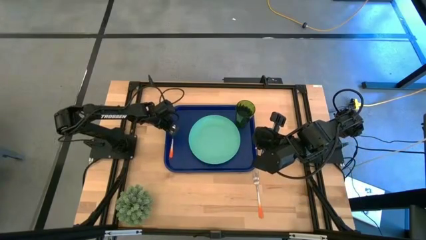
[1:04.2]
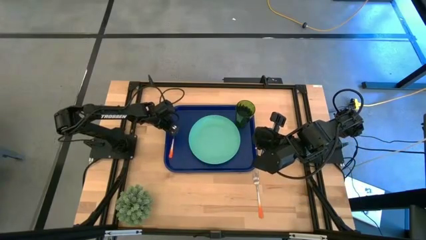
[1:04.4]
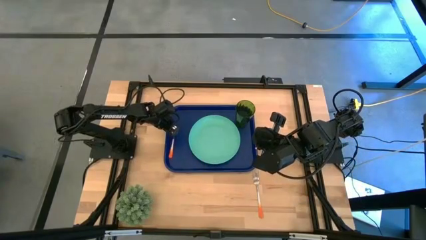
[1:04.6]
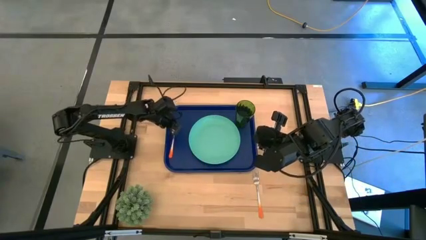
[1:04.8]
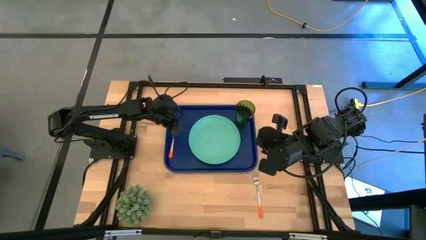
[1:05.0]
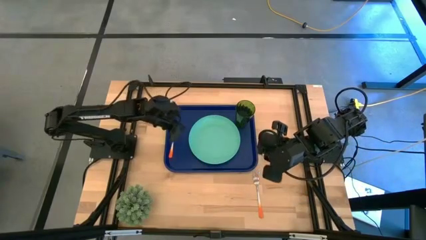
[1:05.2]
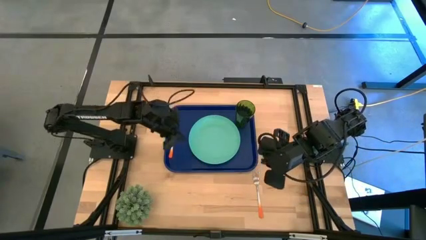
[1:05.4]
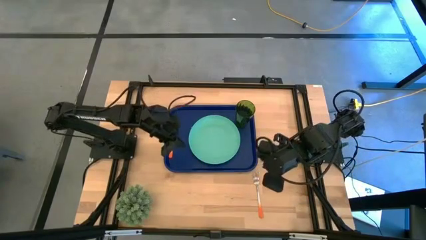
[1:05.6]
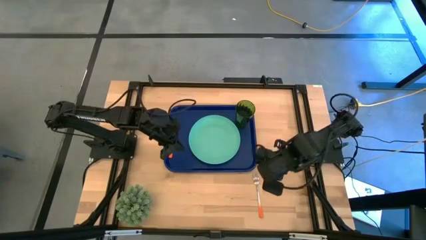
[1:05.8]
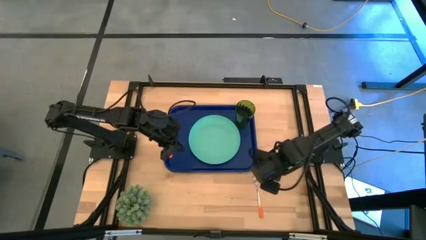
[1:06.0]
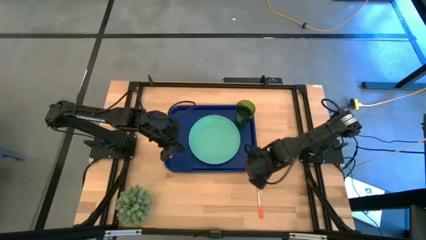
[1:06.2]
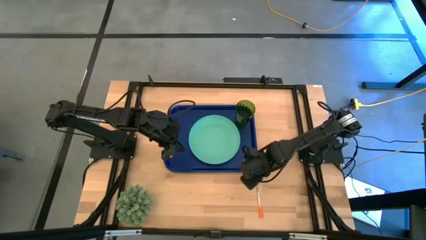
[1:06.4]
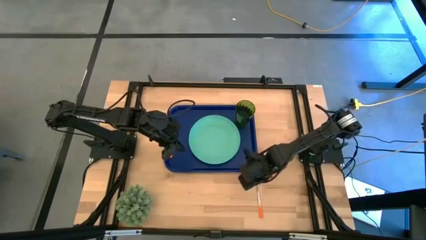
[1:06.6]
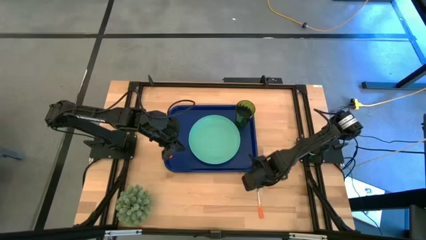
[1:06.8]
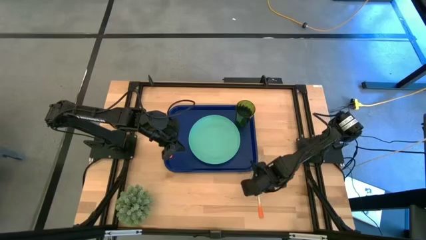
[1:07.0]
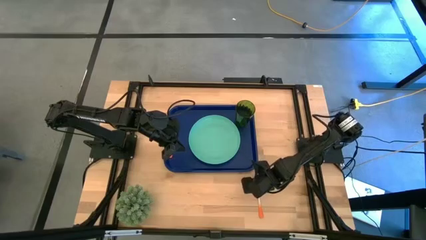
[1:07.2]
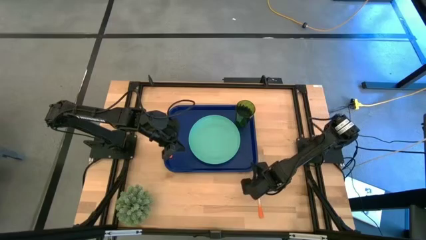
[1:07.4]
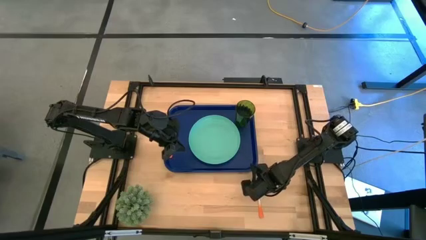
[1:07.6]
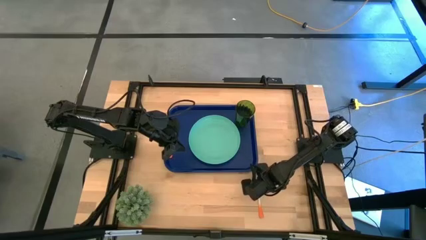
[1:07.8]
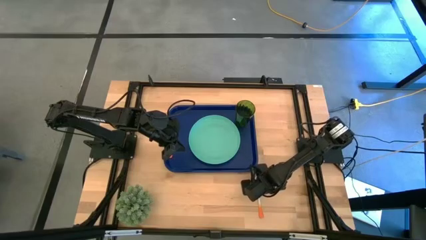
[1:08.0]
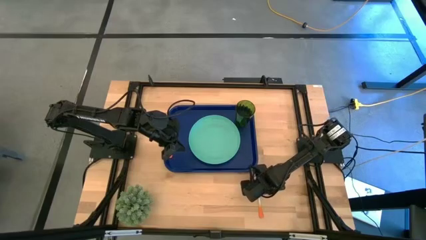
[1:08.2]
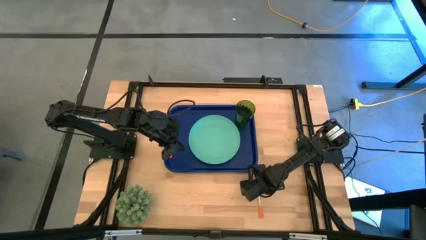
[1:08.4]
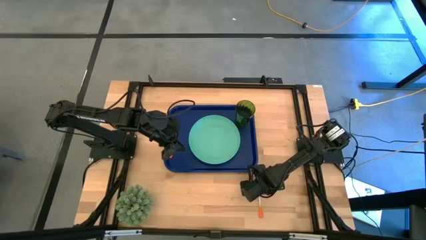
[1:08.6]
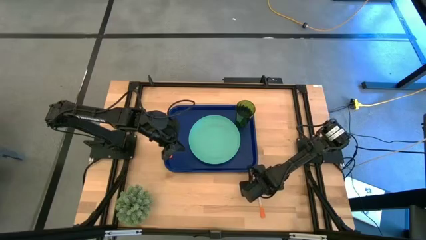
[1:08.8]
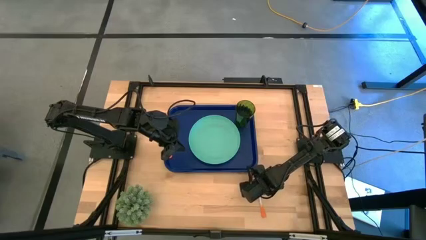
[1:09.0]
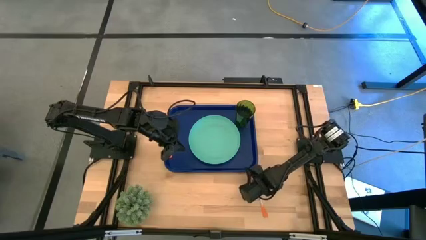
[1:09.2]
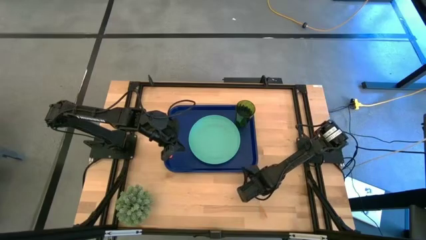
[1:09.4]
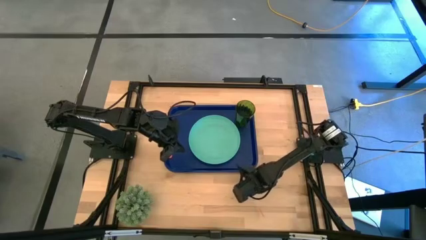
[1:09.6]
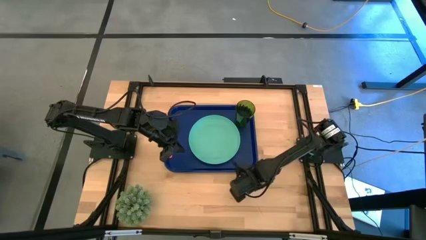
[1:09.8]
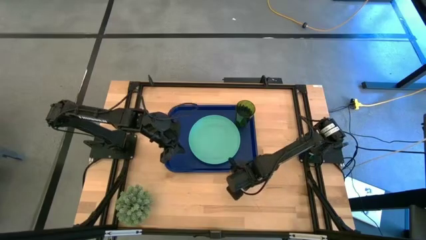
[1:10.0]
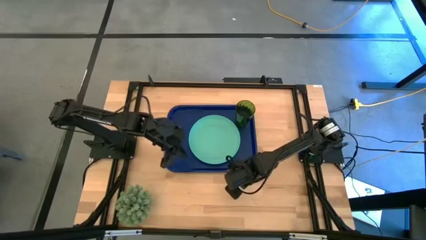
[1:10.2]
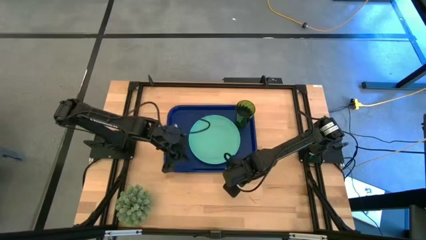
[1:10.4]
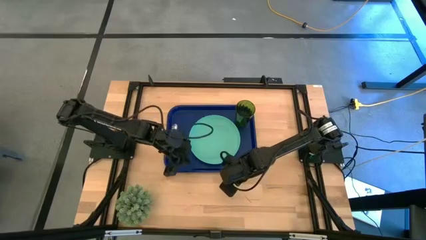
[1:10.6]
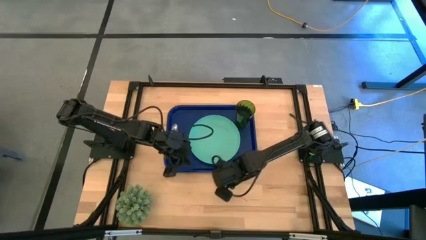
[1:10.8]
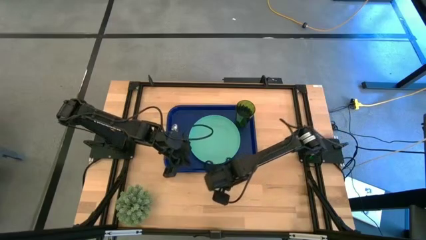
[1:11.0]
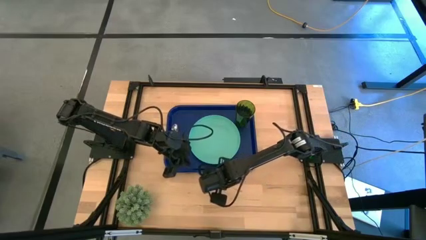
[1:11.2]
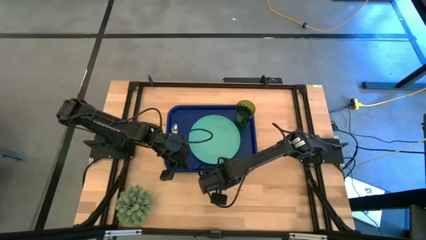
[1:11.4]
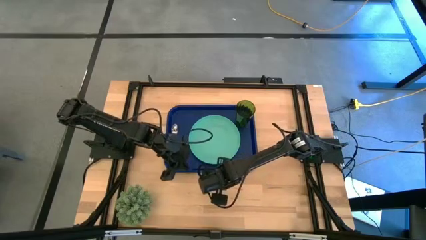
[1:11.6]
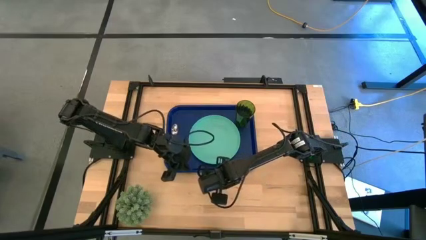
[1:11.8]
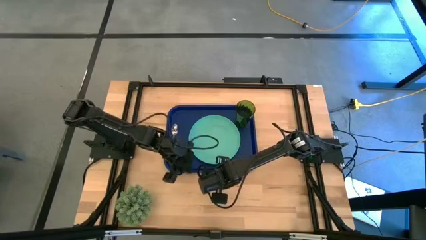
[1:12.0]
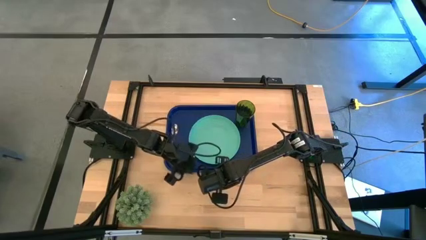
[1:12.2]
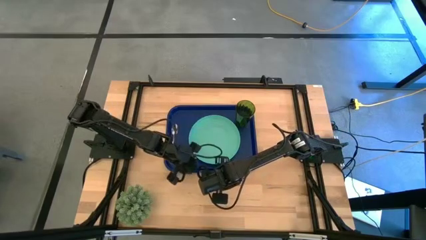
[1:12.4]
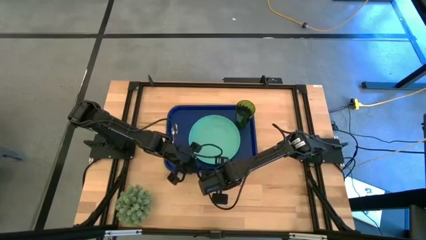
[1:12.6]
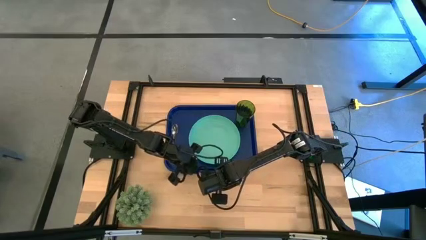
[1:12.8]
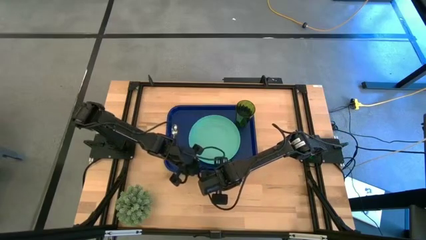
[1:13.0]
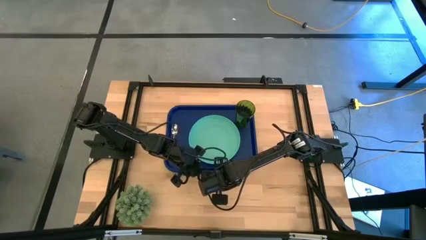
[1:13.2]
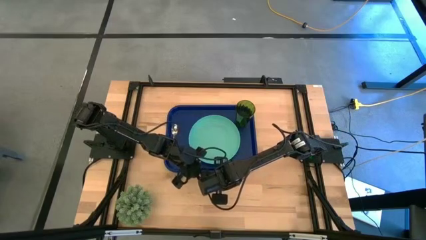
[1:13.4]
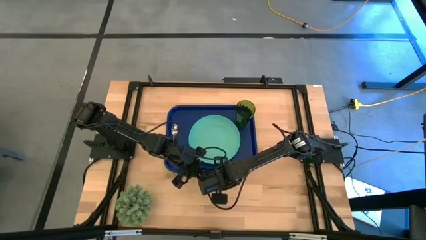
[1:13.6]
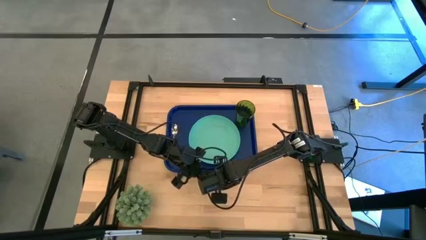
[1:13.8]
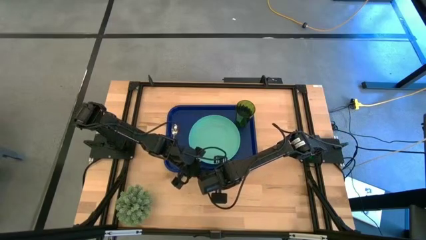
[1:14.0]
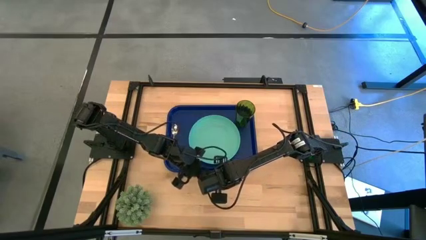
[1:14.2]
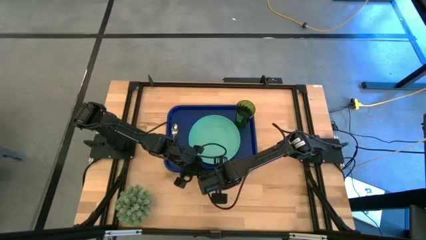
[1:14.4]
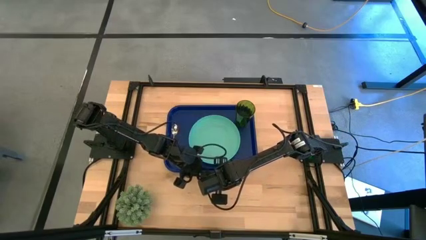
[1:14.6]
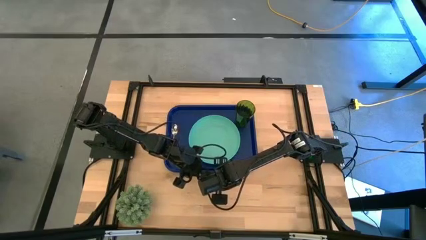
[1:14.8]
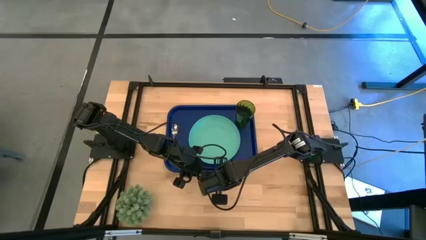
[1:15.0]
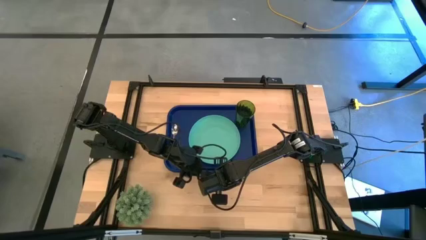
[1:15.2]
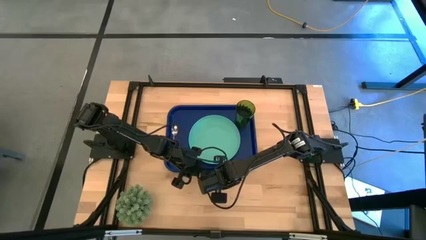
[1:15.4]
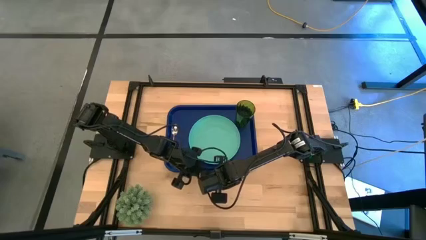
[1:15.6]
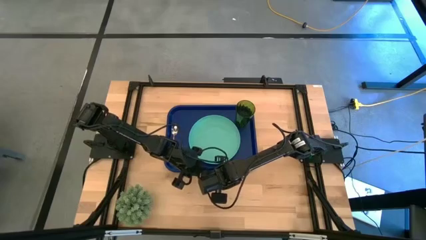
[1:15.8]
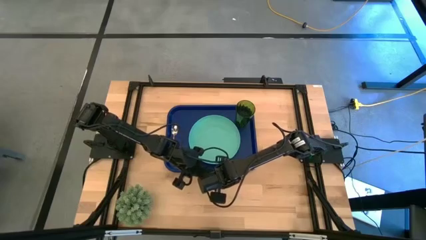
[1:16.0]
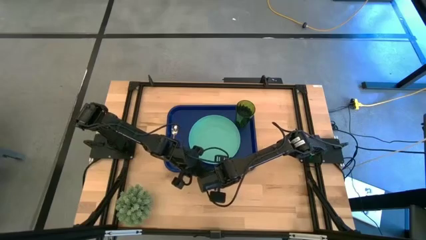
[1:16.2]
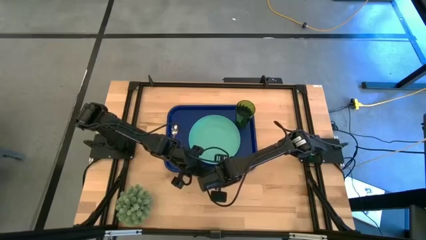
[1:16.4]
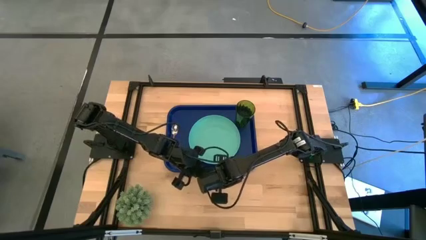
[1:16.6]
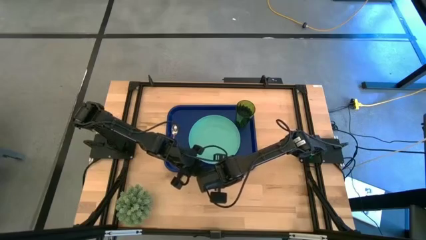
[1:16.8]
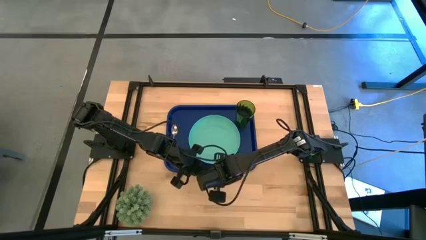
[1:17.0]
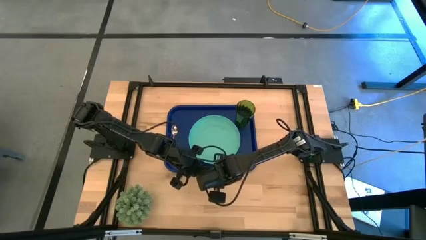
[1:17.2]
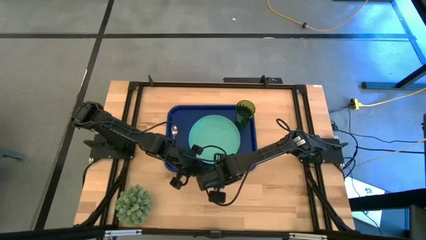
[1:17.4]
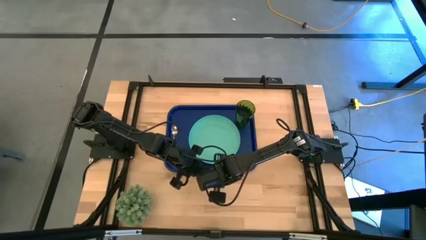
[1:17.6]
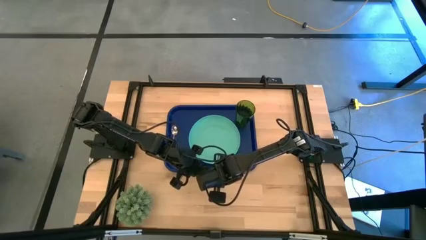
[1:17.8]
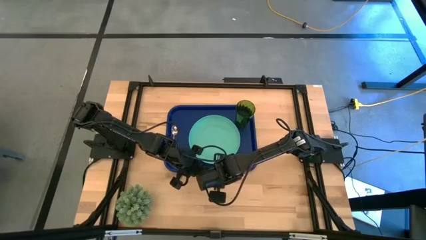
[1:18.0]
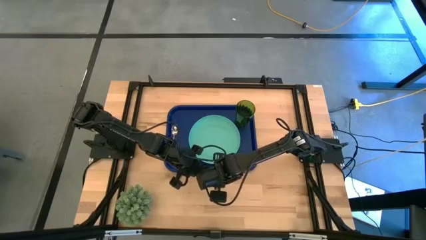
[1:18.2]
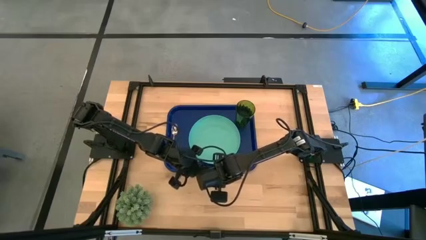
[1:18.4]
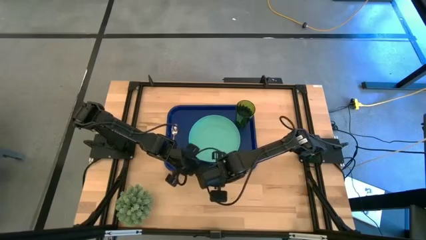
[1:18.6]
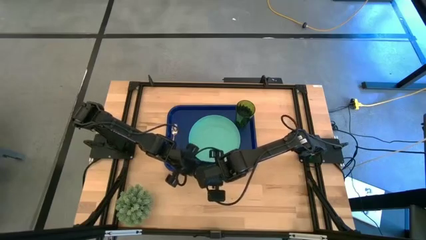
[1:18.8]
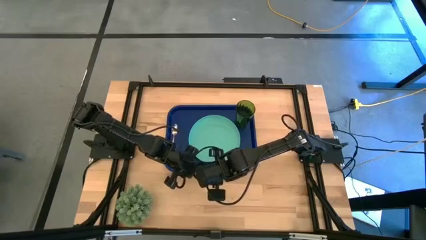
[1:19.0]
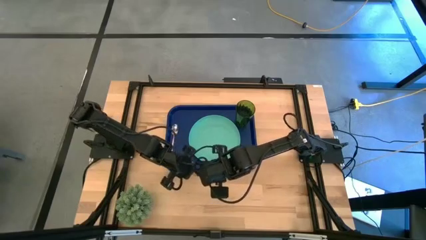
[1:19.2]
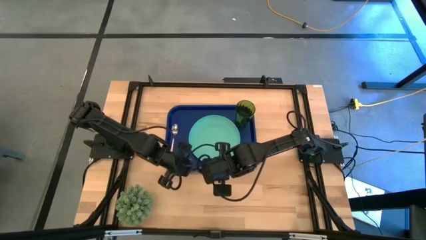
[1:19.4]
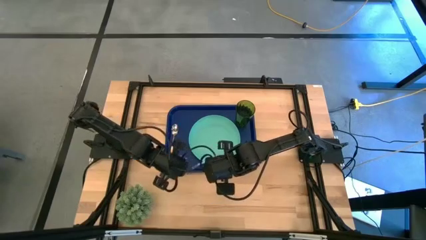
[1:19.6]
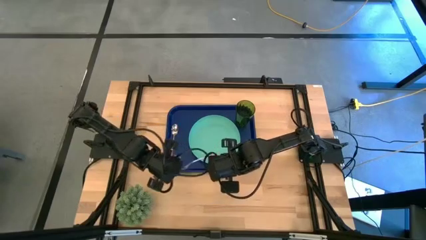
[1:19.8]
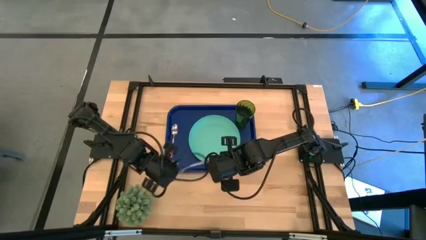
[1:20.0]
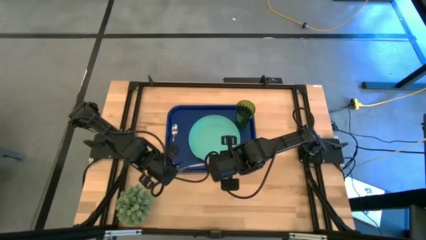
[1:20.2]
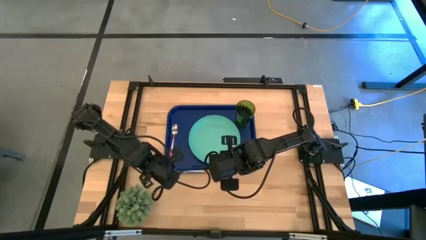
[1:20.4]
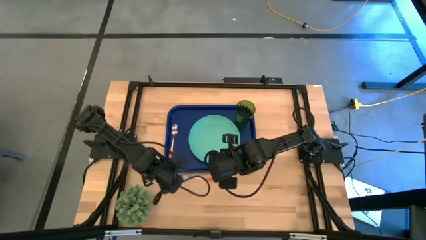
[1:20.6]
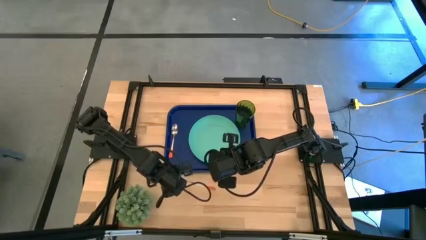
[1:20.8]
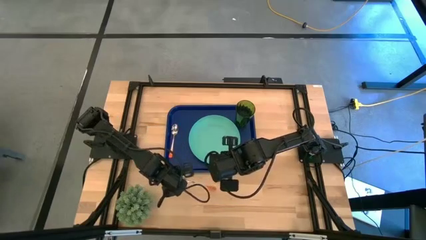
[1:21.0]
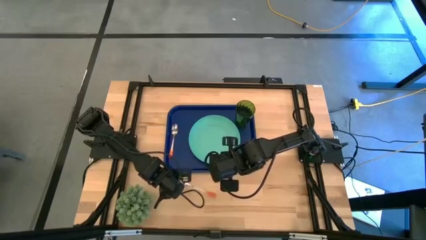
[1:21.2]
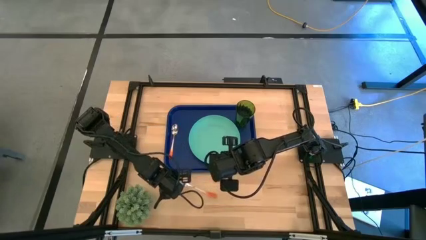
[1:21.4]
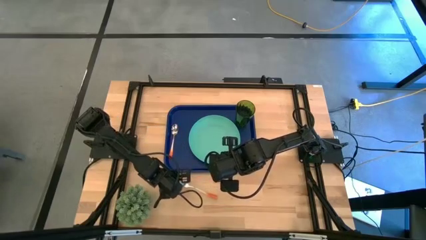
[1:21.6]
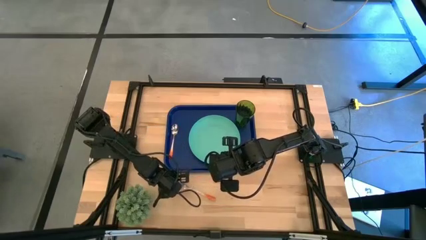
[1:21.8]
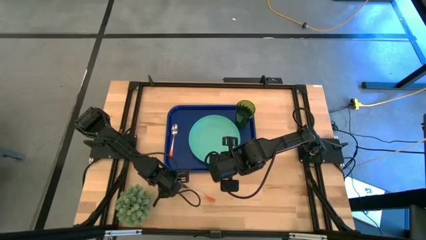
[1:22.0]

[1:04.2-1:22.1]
Task: Pick and place plate/cup/fork/spoon on tray
Put the orange fork on the blue serving tray to the left side of the green plate
